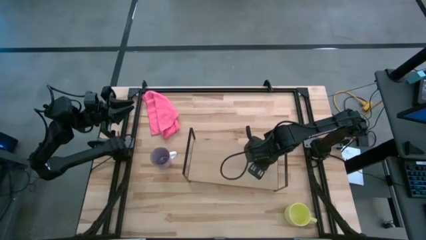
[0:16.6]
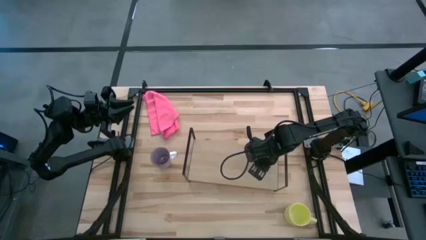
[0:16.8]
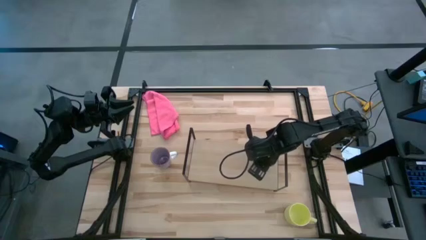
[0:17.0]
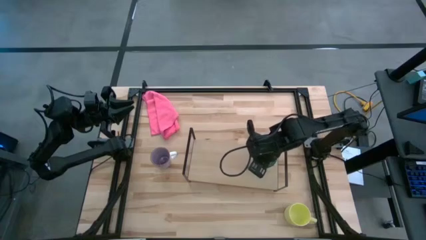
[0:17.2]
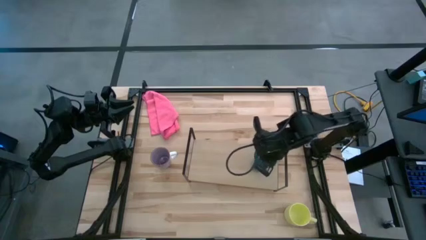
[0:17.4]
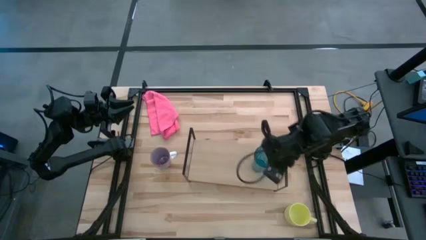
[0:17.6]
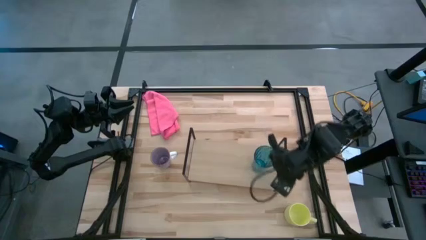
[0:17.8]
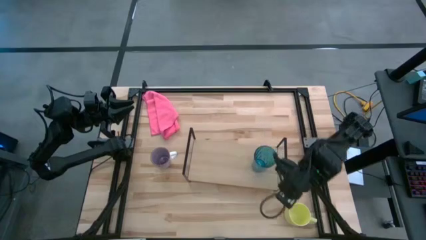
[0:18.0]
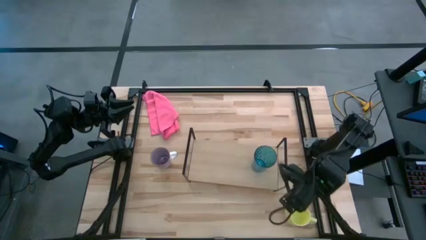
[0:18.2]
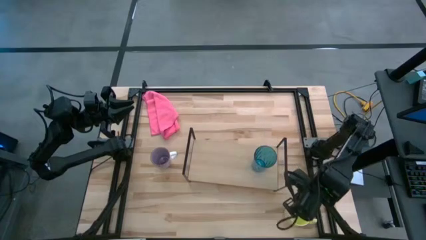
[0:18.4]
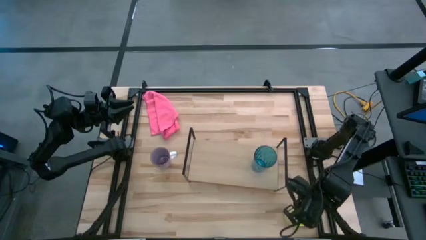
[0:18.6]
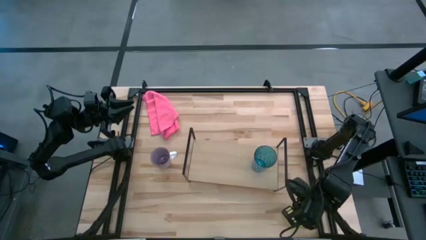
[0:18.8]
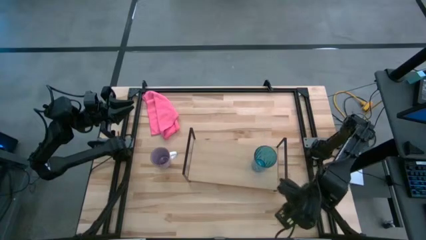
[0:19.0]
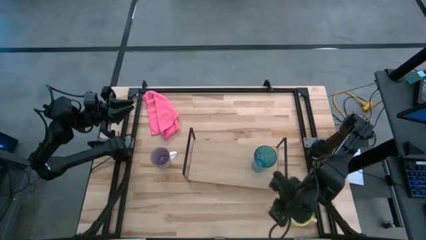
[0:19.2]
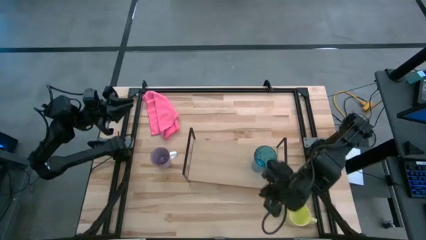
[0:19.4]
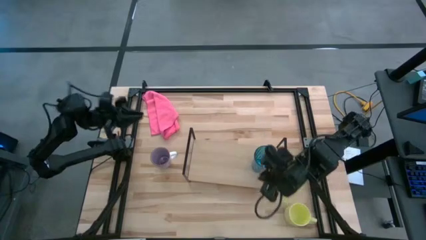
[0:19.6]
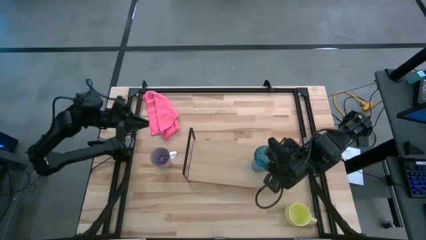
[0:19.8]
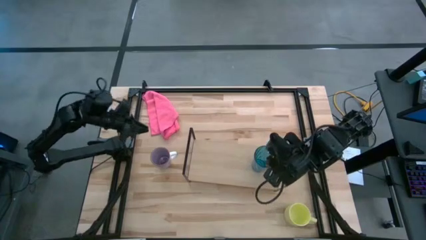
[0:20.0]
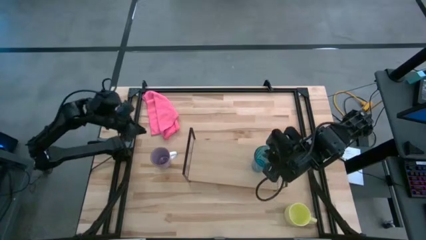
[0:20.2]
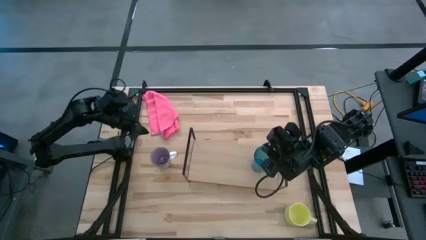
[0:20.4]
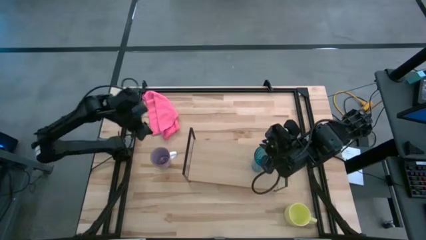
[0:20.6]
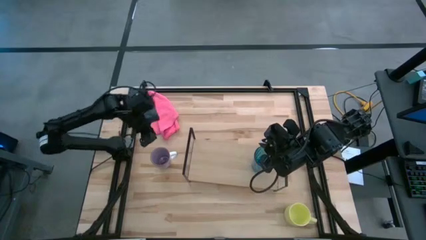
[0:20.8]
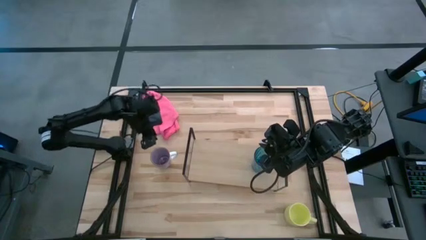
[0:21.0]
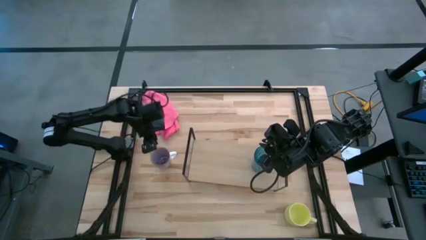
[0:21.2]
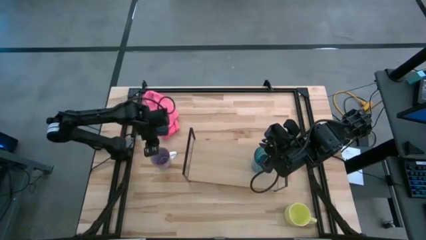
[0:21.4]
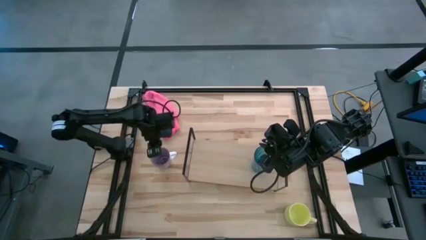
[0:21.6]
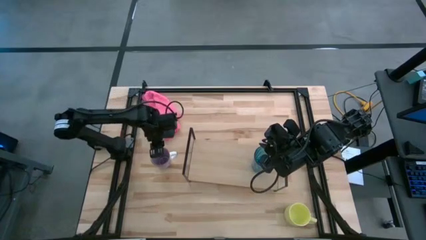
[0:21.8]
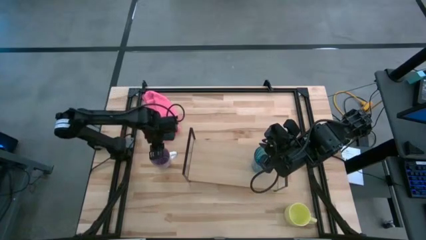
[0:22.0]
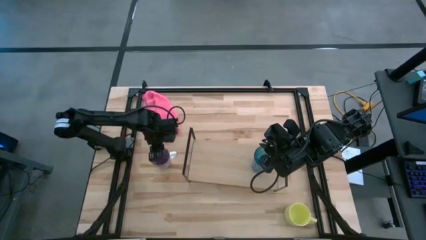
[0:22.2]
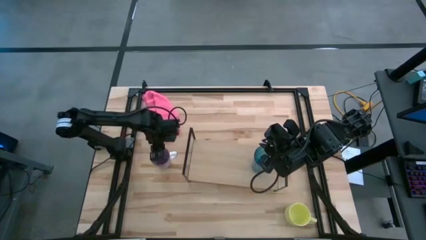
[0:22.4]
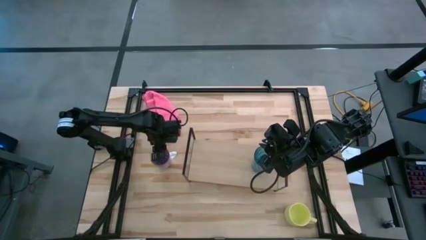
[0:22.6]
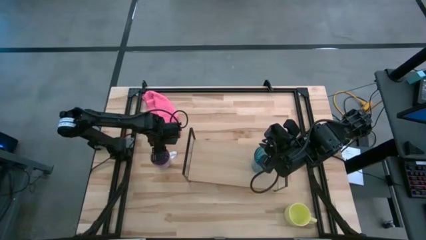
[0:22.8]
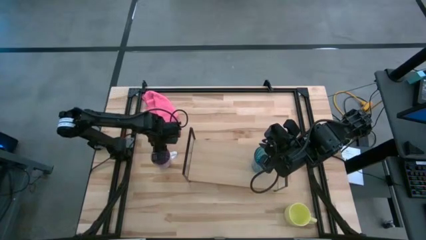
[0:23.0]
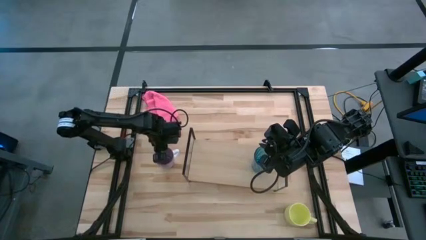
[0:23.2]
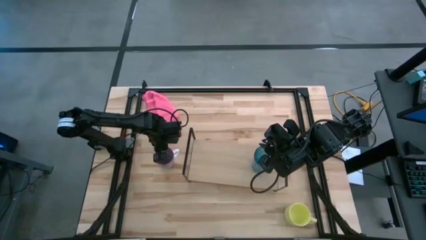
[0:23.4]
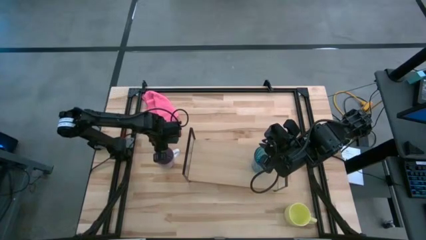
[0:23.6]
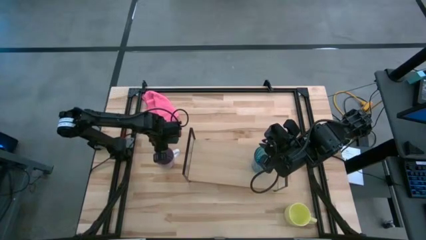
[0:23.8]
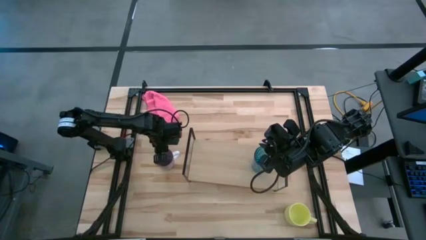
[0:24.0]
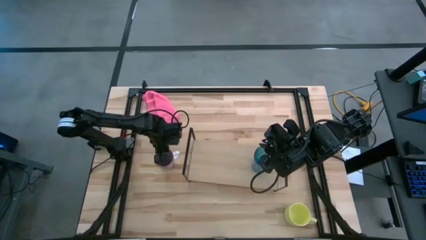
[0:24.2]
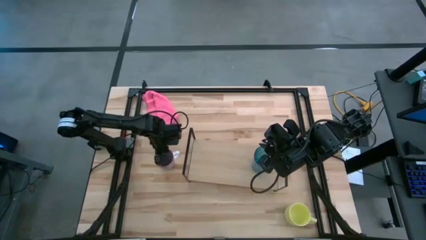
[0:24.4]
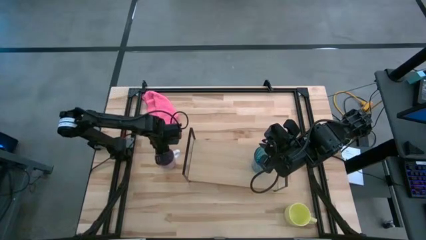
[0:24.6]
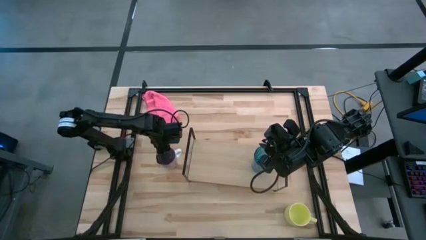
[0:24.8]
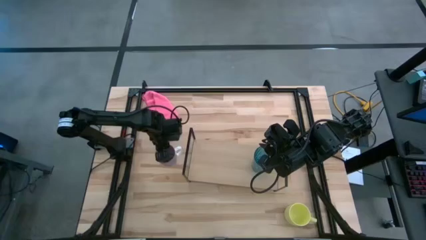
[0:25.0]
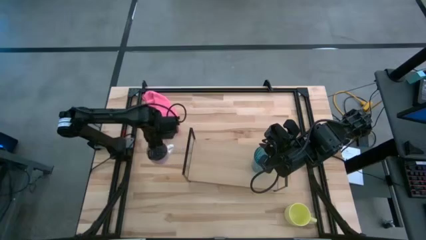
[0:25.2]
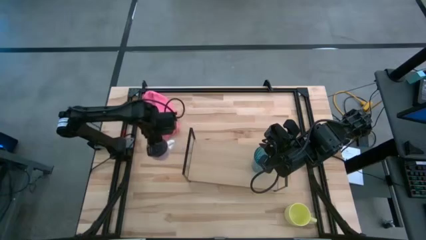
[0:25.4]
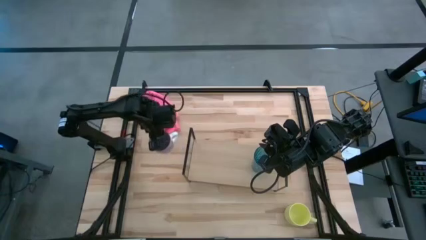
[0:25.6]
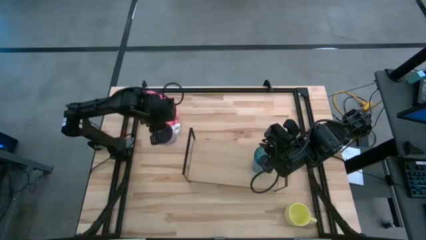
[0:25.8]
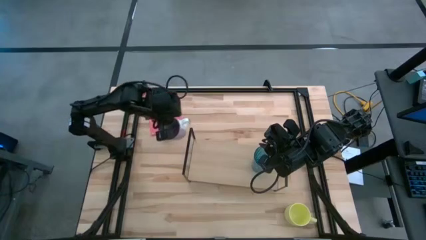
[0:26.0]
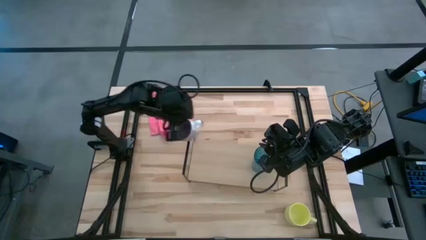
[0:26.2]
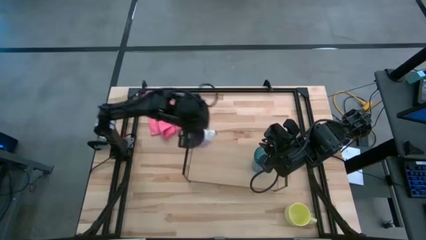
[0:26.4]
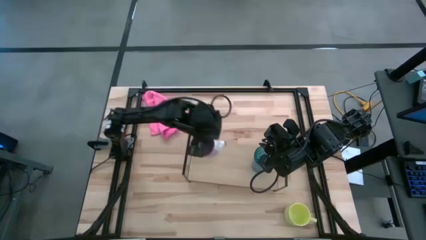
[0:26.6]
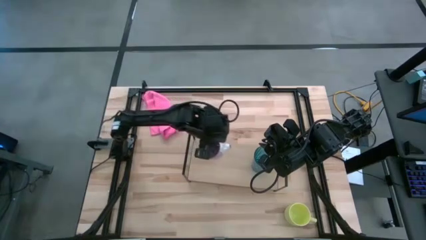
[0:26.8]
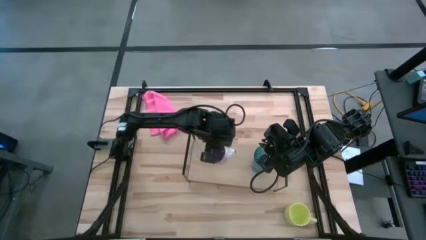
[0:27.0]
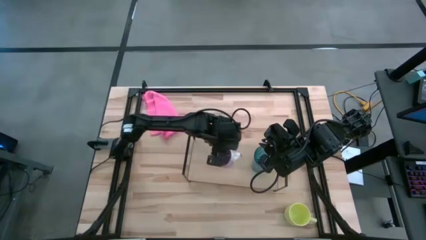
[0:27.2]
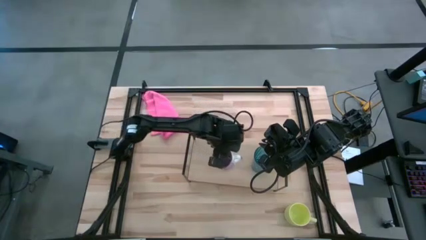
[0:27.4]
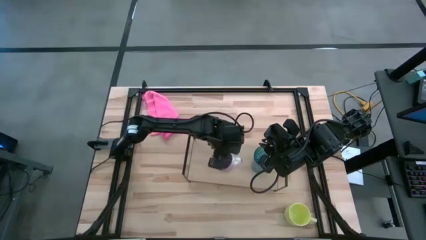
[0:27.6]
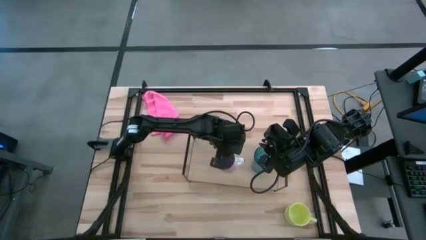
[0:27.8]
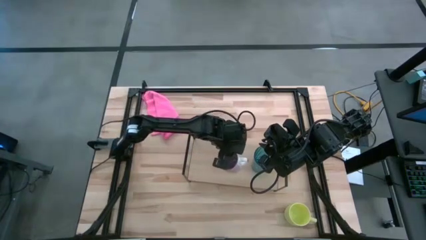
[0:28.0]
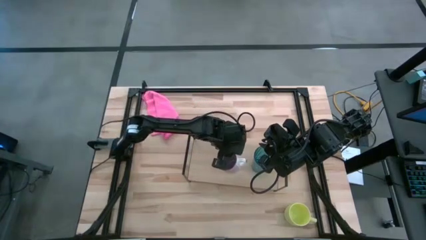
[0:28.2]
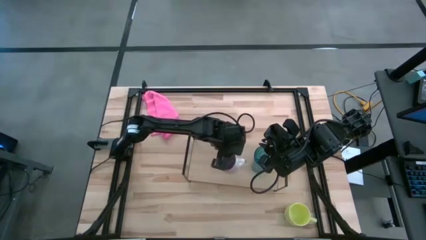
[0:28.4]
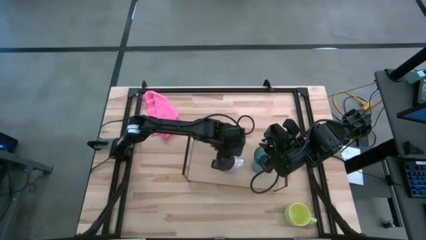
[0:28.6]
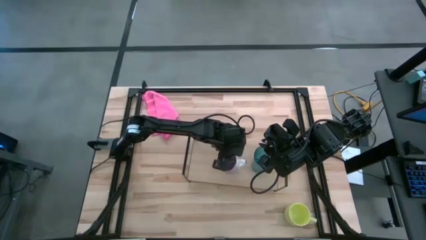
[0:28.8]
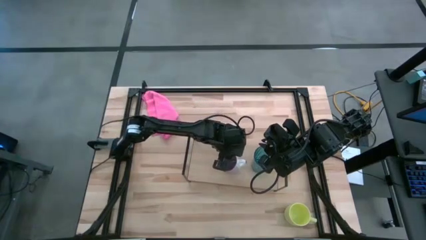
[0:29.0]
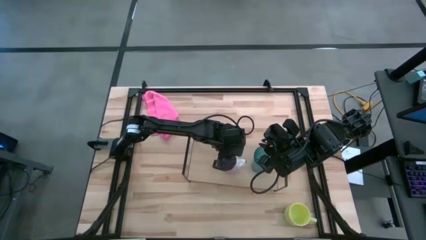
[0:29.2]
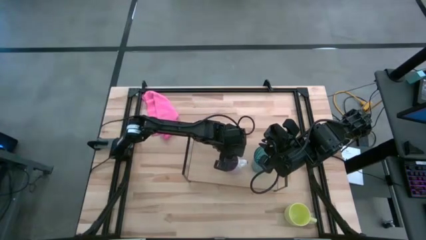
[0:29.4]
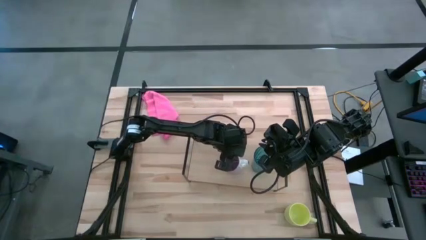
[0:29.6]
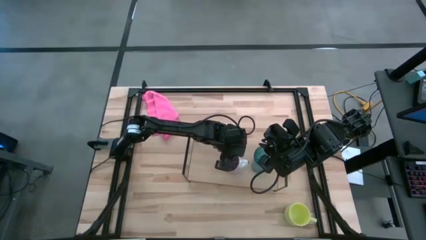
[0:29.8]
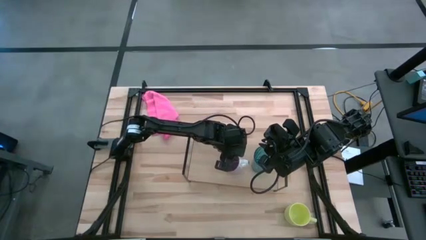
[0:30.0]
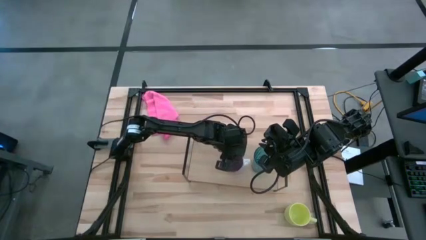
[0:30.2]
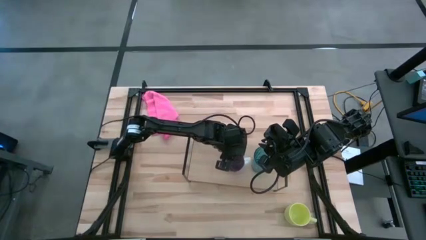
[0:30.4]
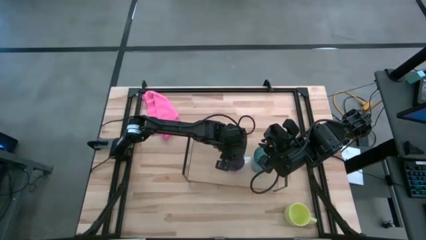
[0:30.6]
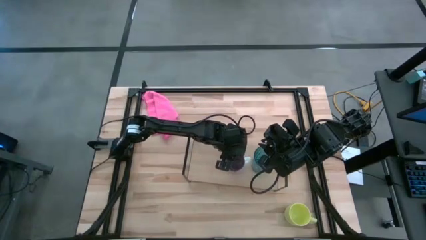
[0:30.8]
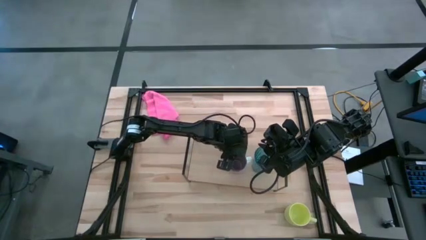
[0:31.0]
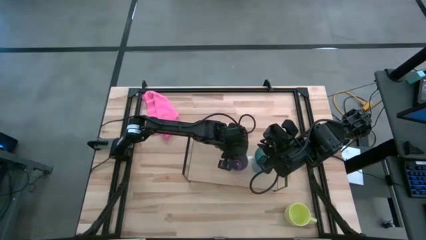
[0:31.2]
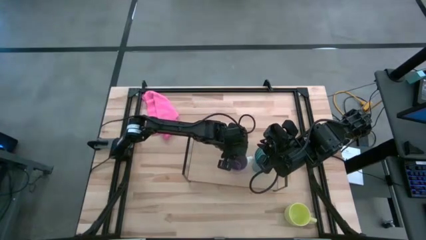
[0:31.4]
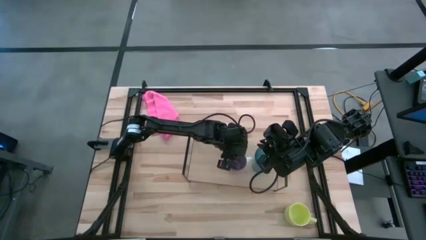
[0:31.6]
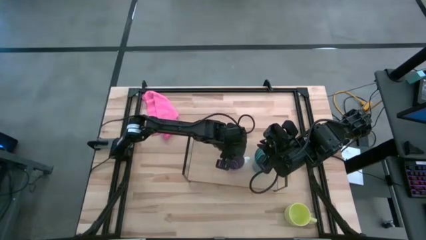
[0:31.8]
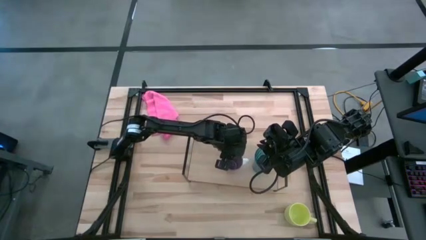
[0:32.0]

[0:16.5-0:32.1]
Task: Stack small to large cups/mugs on shelf
Put purple mug on the shelf
